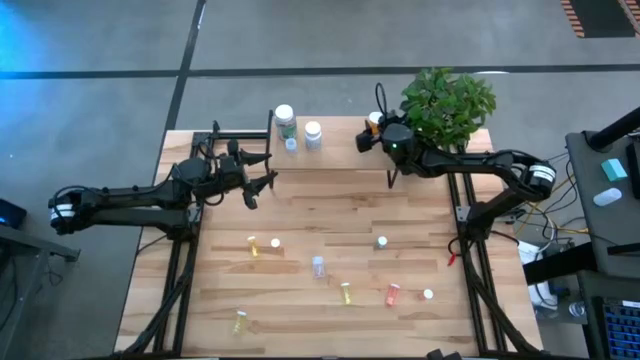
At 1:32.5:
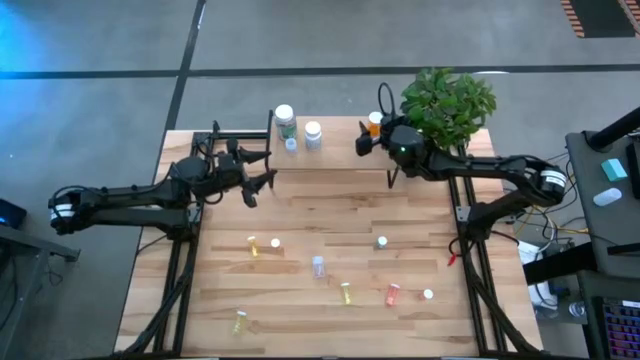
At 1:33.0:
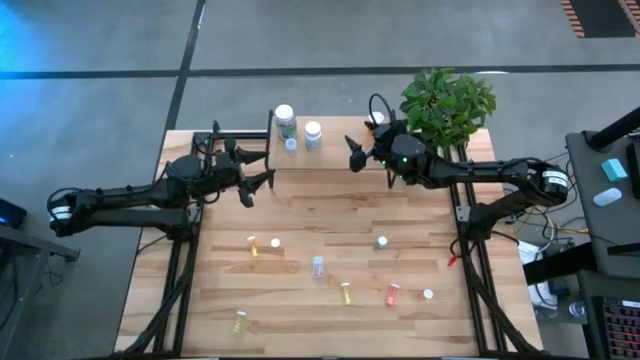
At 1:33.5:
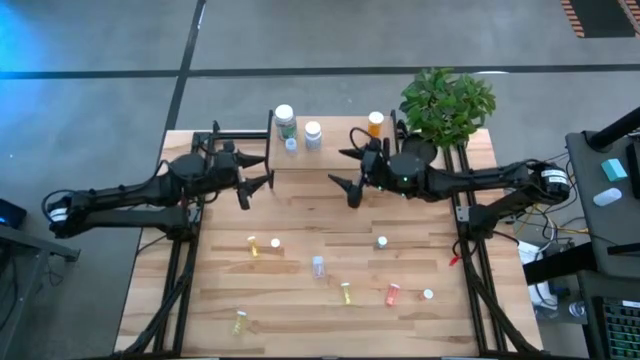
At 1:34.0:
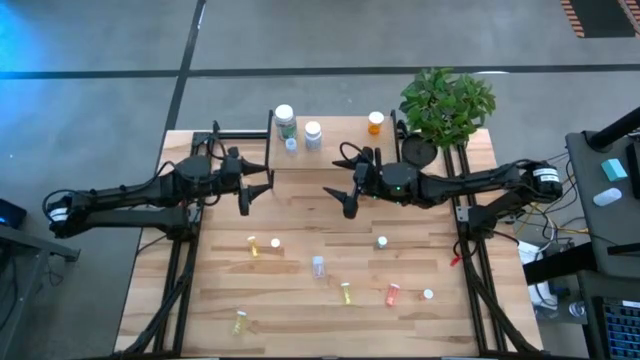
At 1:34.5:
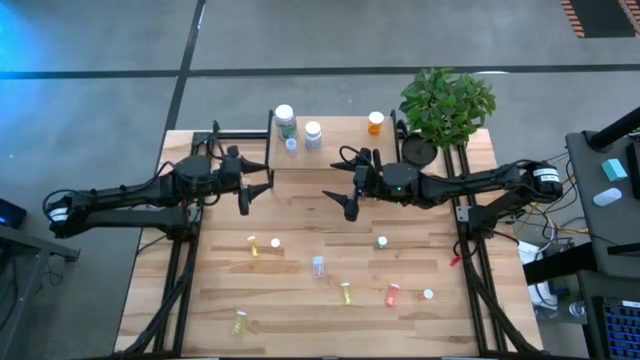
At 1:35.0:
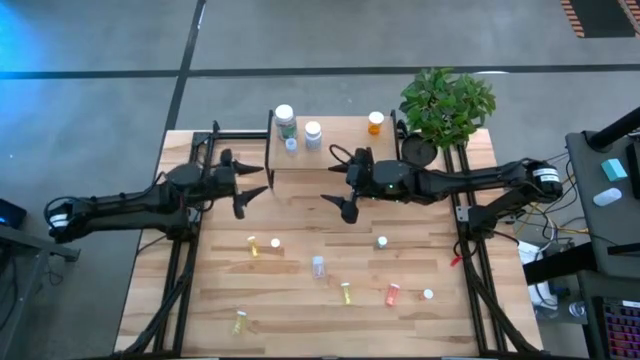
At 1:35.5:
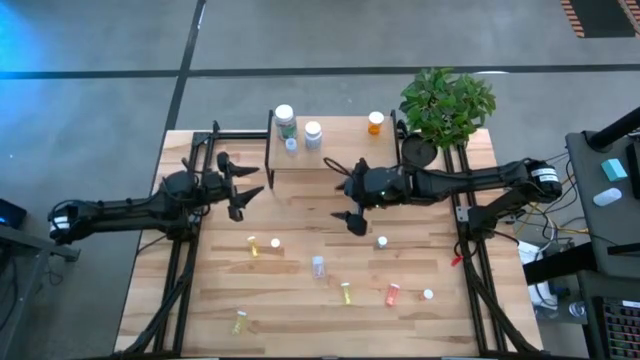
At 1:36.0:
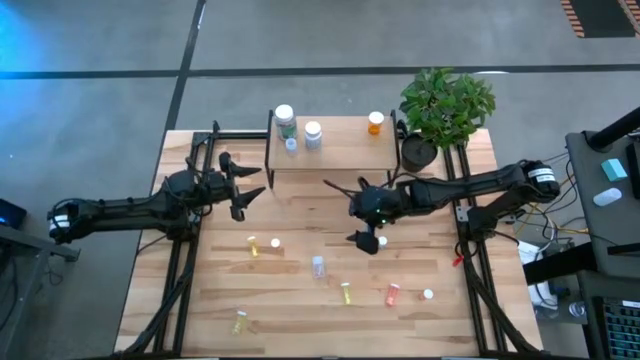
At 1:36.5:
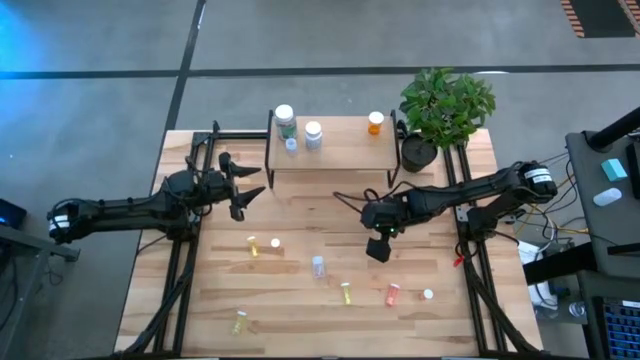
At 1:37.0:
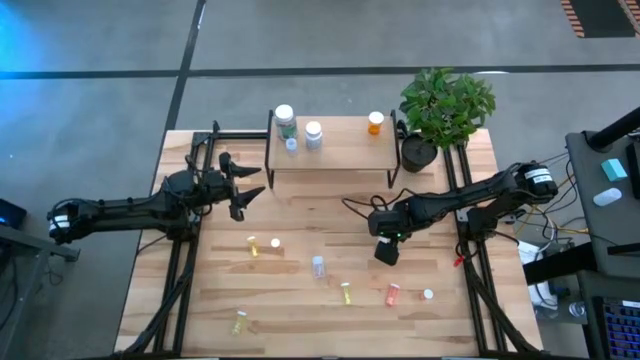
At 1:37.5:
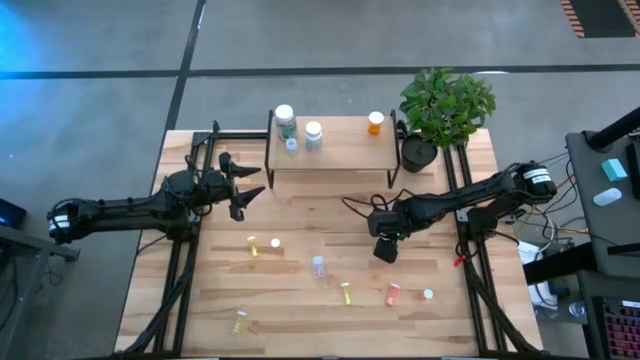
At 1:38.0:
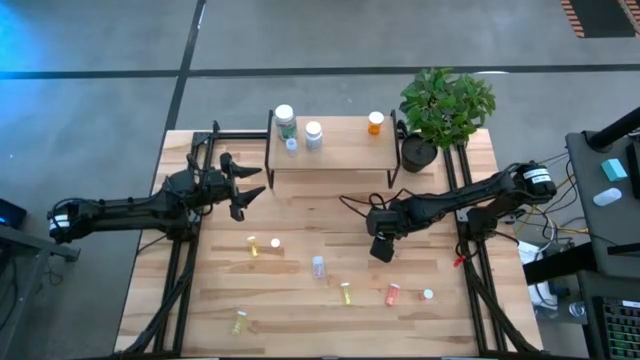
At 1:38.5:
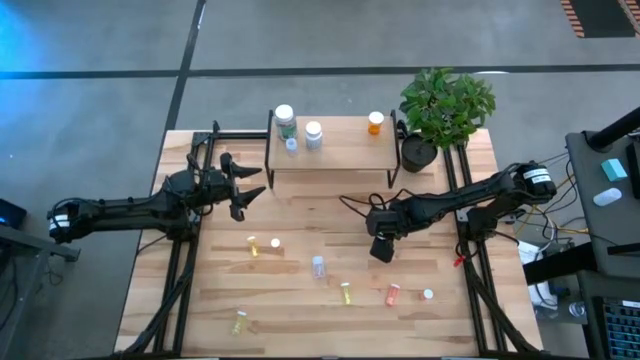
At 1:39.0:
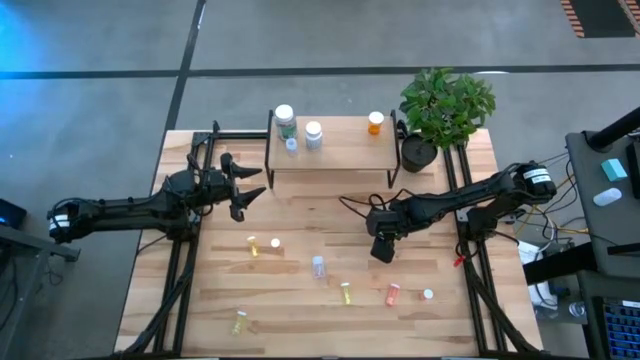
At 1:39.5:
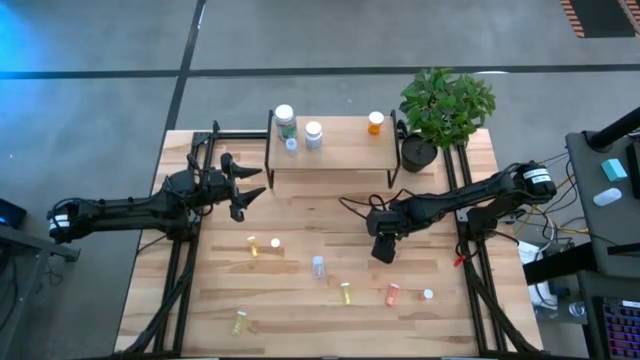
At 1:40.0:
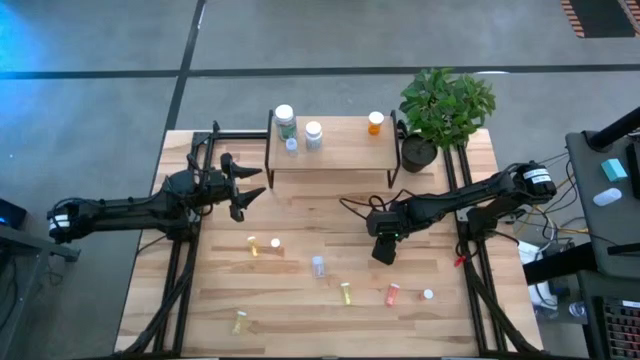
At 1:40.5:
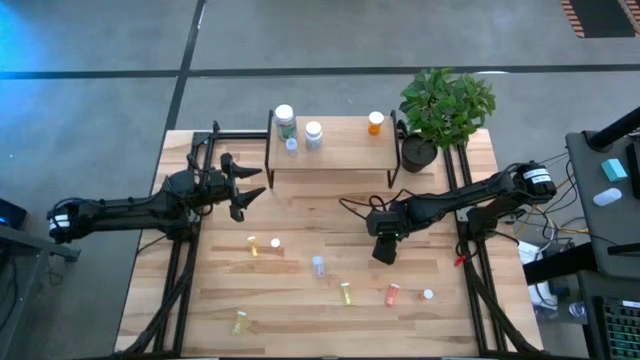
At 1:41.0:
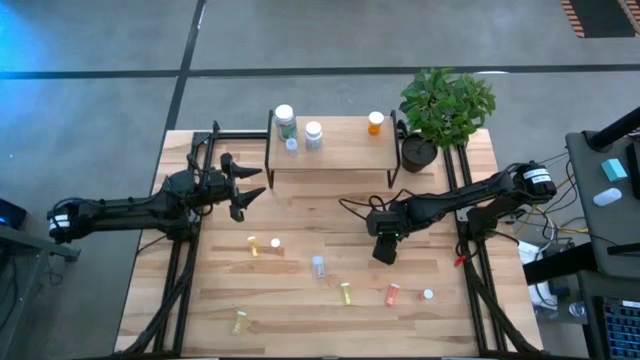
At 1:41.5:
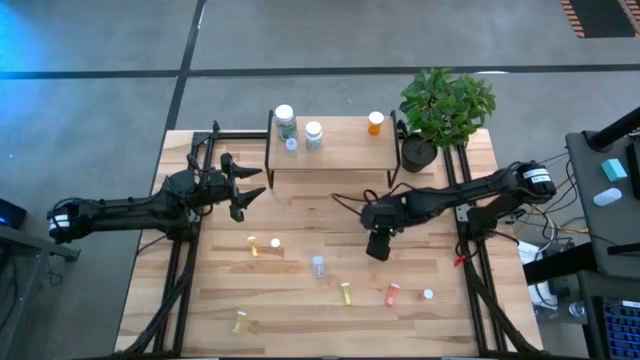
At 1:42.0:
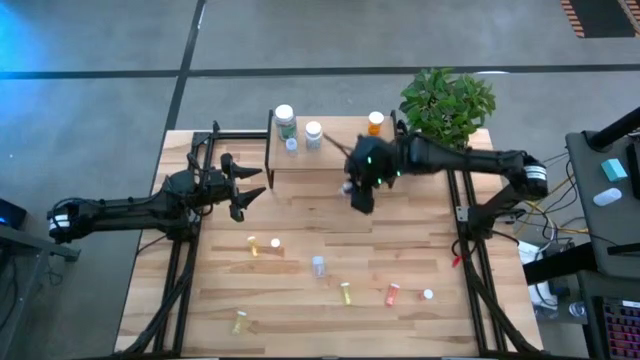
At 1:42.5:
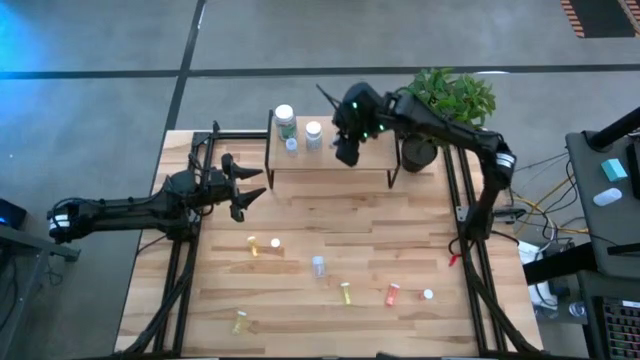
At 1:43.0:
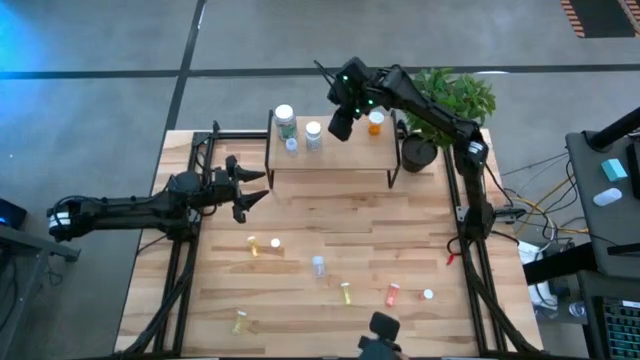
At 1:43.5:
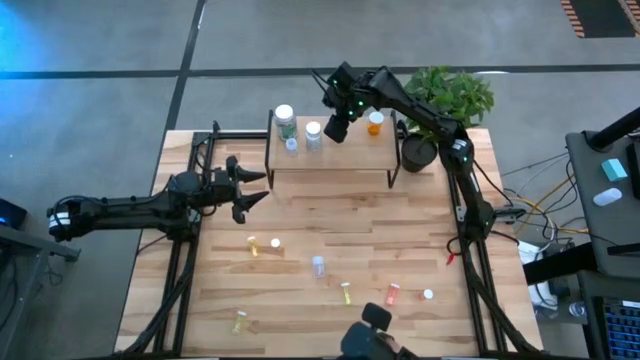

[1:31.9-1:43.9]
Task: Pick and place medicine bottles onto shelf by color
Put the blue pill bottle on the shelf

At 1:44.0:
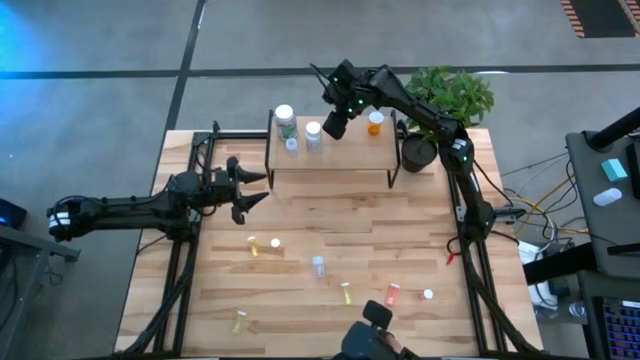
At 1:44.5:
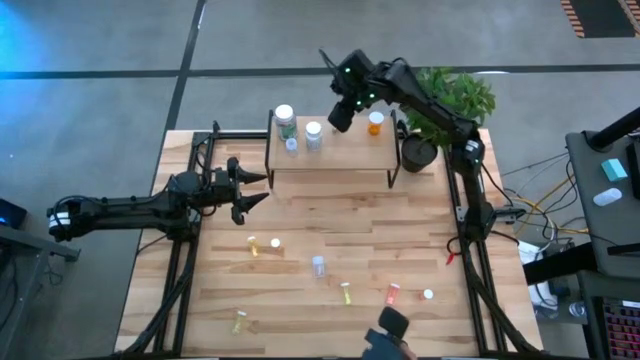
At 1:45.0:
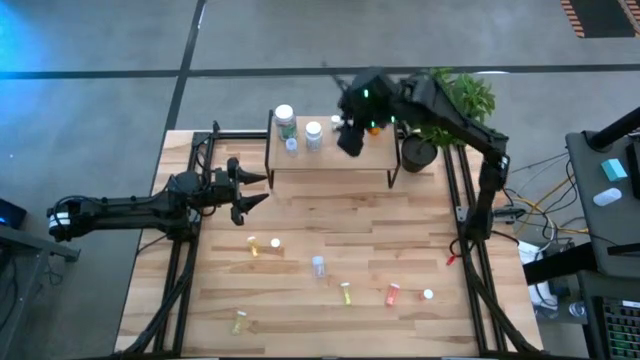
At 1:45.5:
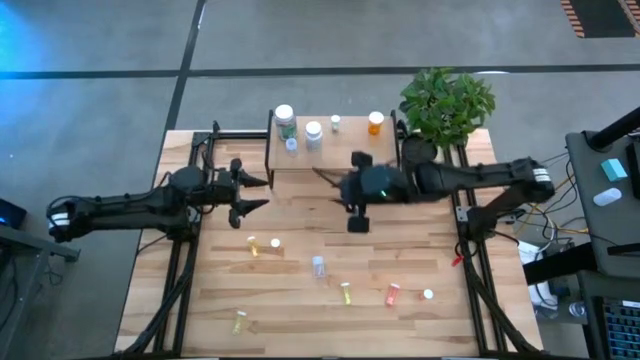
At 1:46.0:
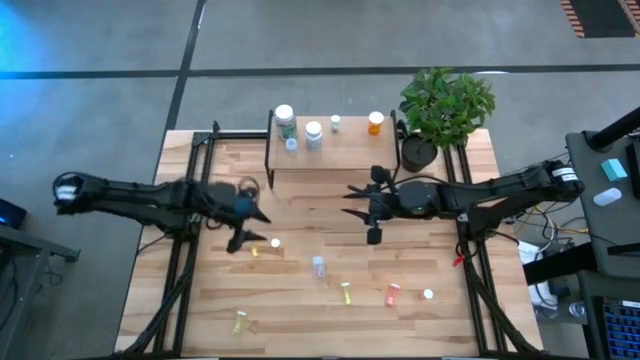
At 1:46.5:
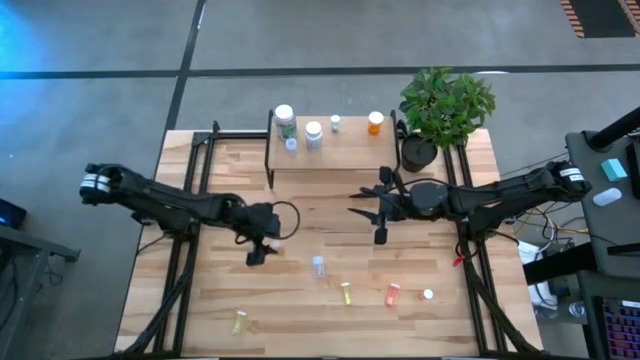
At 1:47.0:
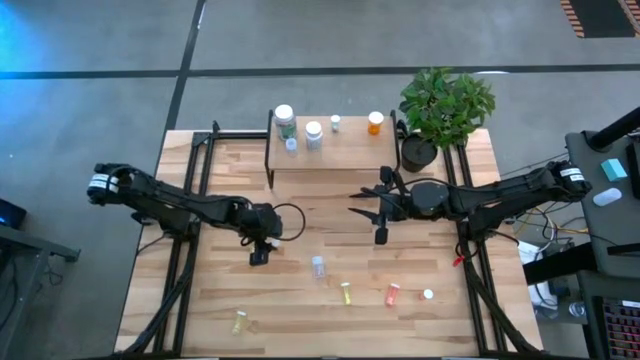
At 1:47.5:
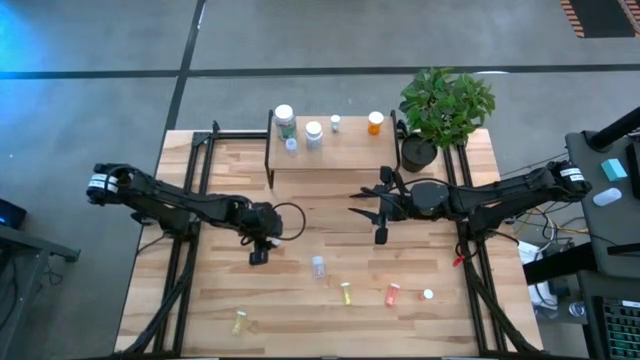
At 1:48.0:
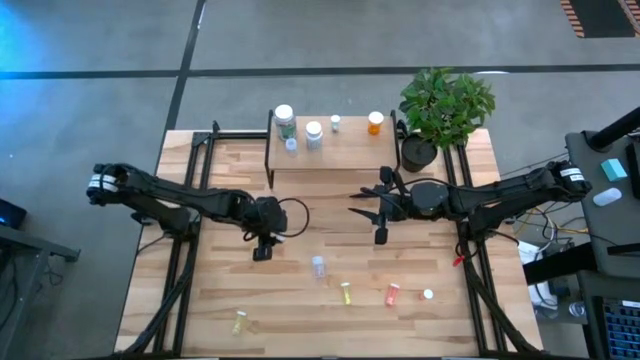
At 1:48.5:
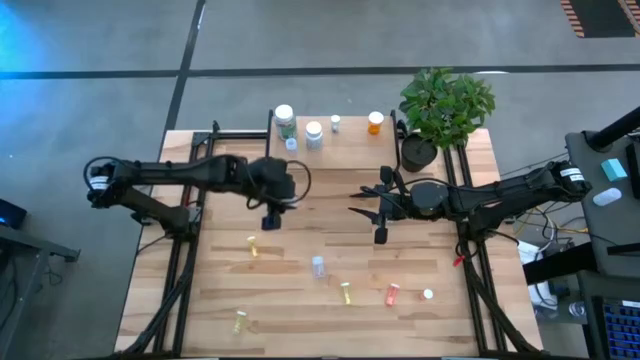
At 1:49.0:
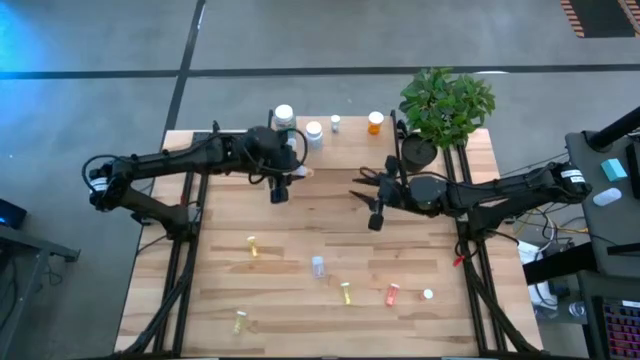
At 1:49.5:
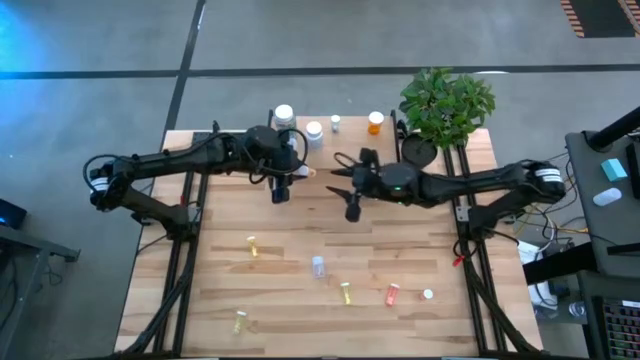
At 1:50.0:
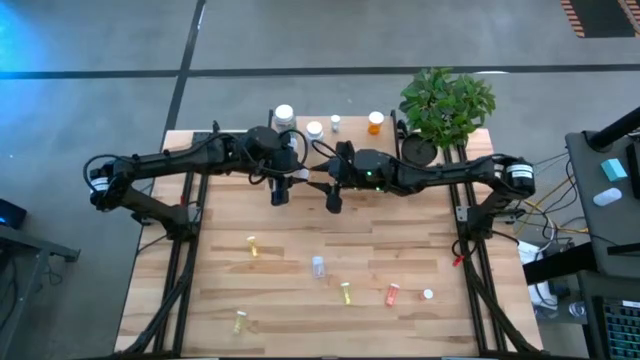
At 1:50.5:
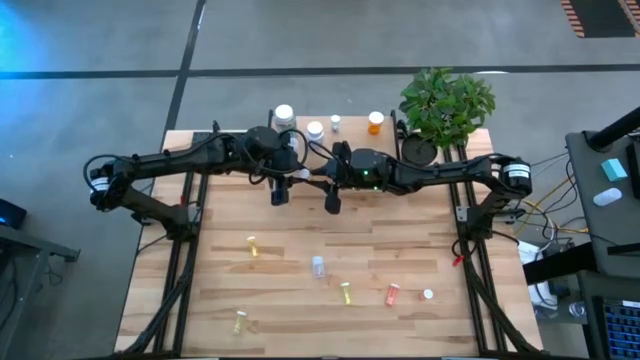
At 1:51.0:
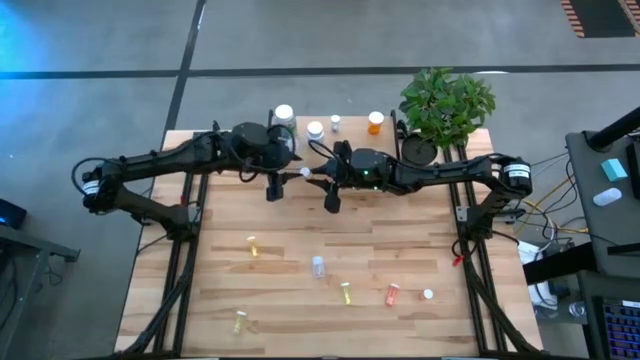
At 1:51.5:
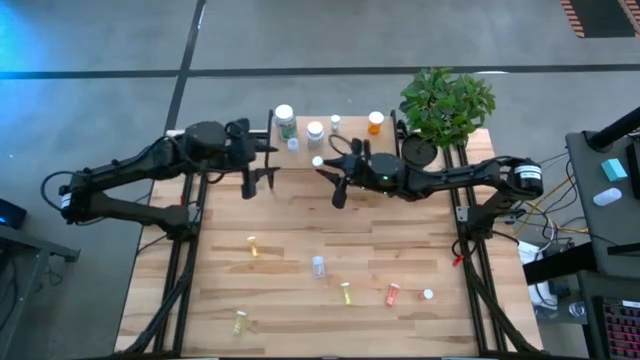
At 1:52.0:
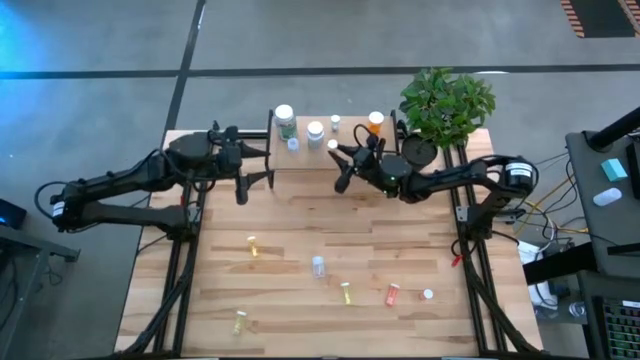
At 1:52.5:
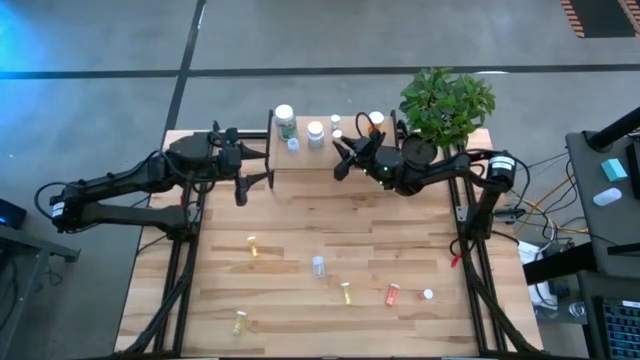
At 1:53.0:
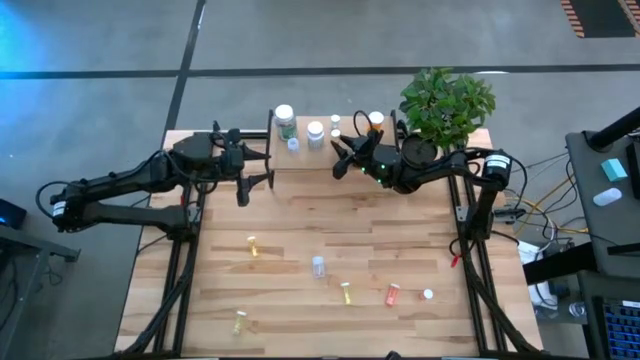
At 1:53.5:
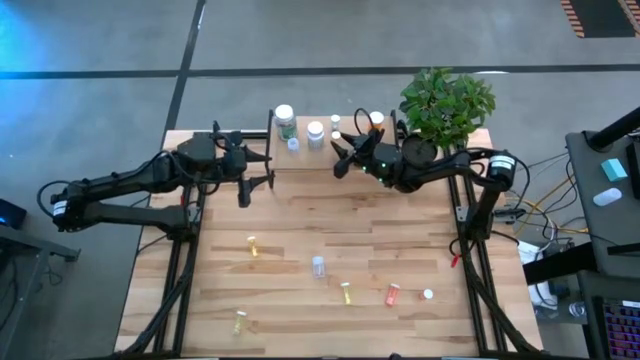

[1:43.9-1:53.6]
Put the yellow pill bottle on the shelf
